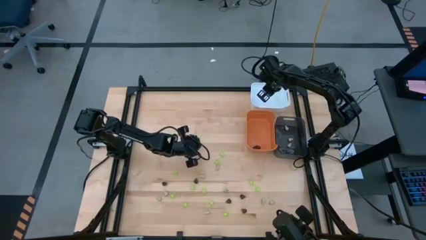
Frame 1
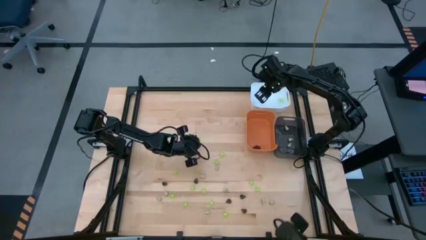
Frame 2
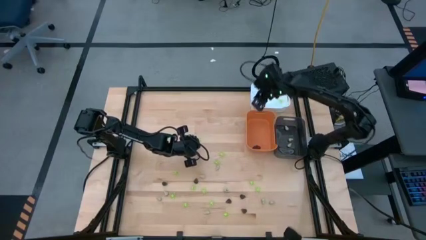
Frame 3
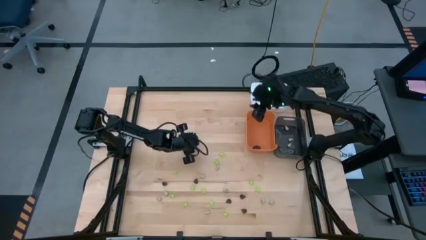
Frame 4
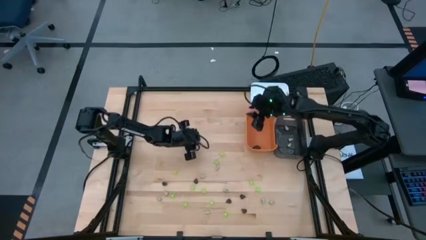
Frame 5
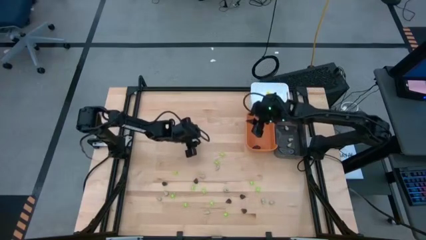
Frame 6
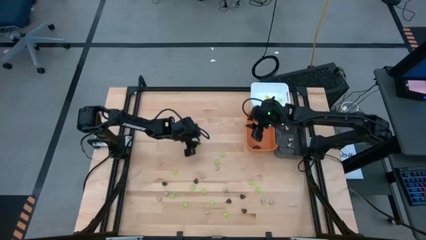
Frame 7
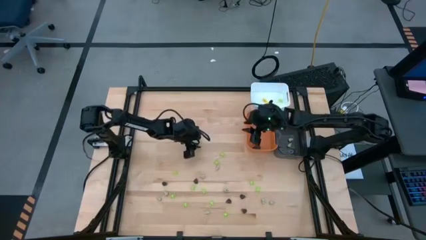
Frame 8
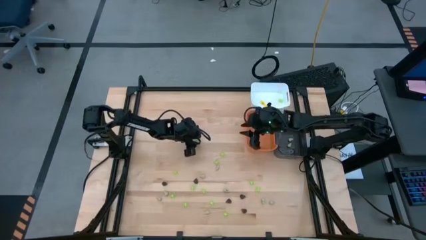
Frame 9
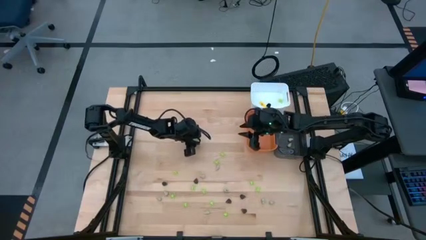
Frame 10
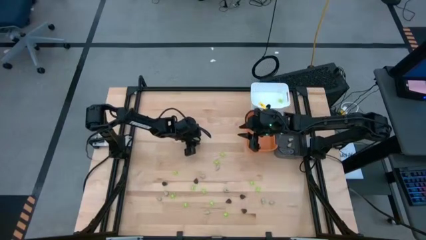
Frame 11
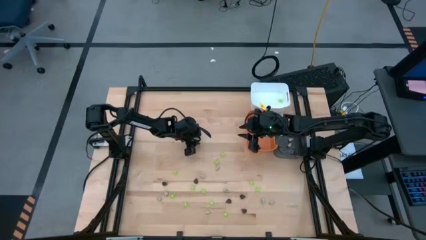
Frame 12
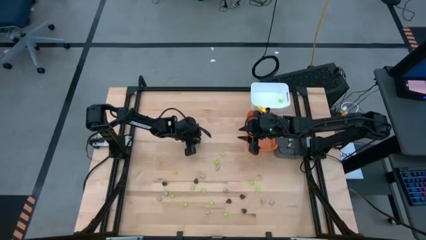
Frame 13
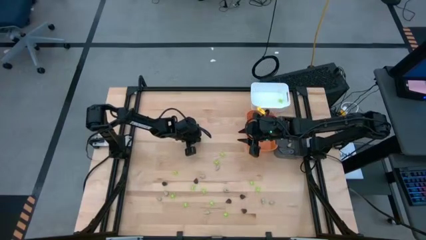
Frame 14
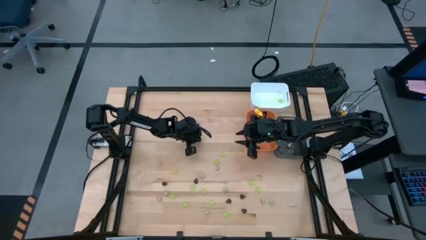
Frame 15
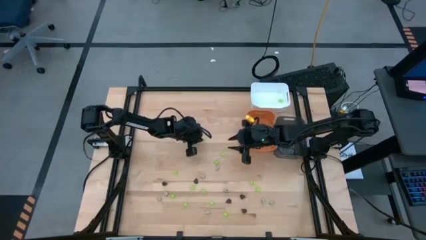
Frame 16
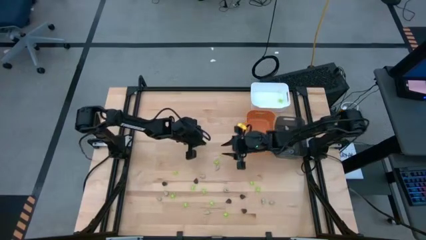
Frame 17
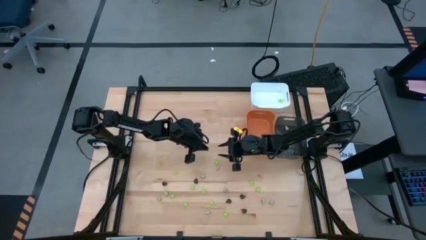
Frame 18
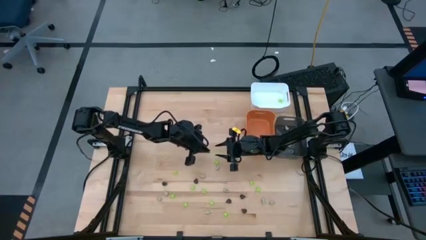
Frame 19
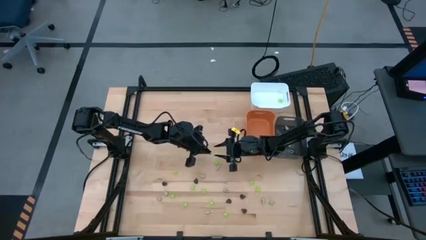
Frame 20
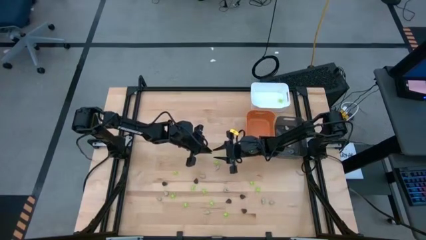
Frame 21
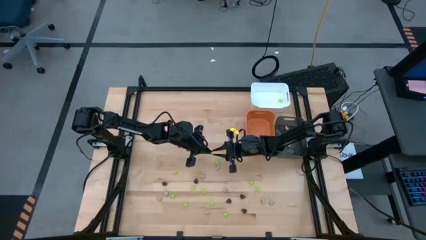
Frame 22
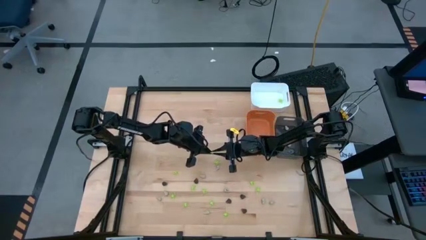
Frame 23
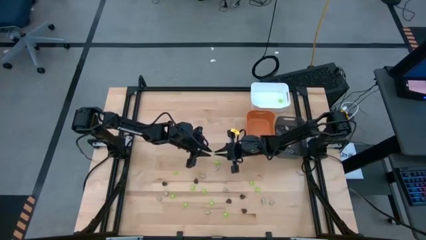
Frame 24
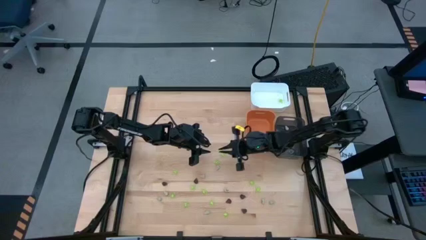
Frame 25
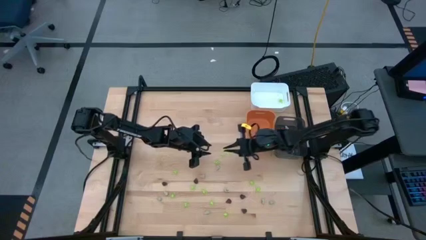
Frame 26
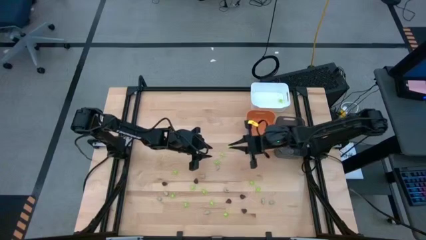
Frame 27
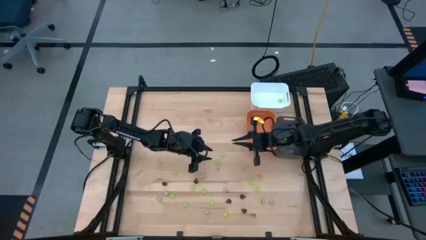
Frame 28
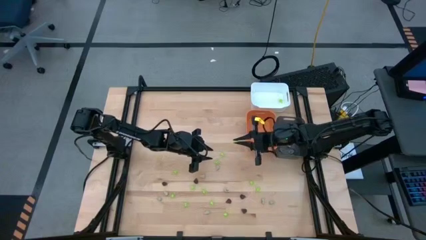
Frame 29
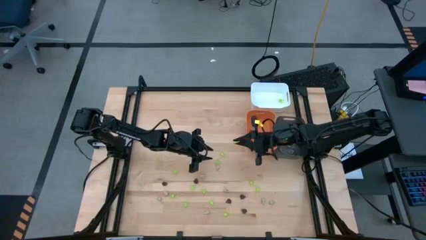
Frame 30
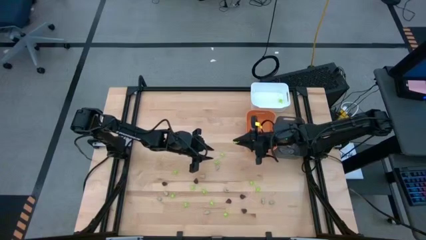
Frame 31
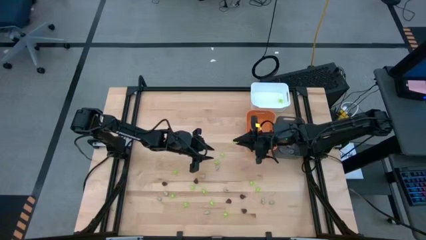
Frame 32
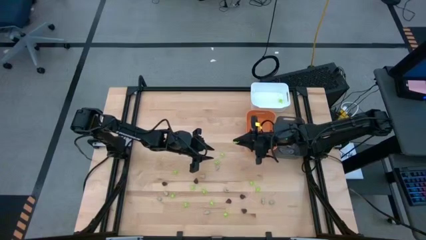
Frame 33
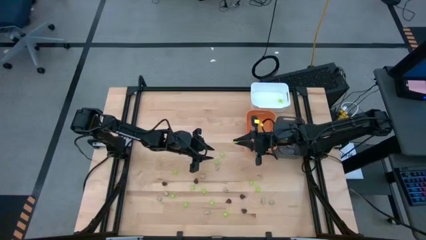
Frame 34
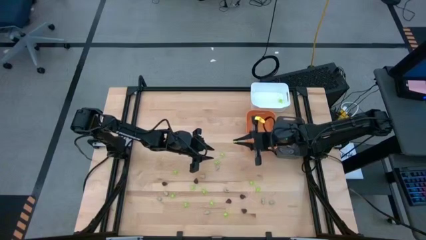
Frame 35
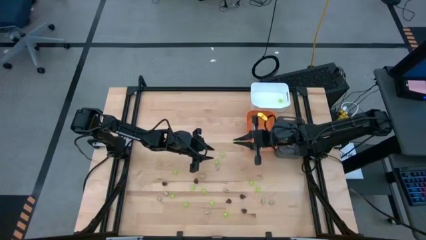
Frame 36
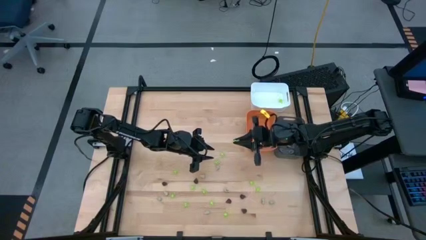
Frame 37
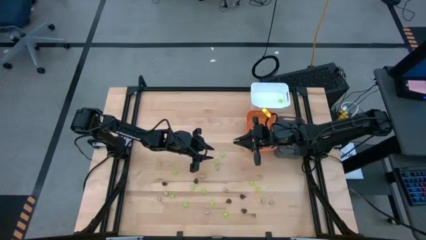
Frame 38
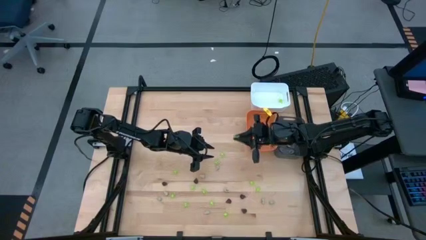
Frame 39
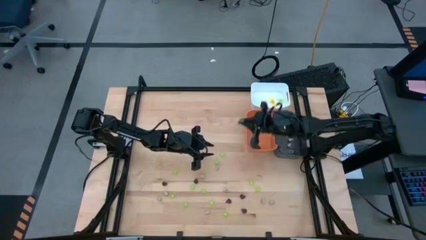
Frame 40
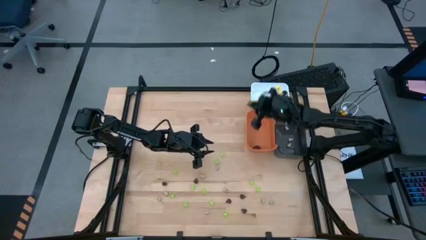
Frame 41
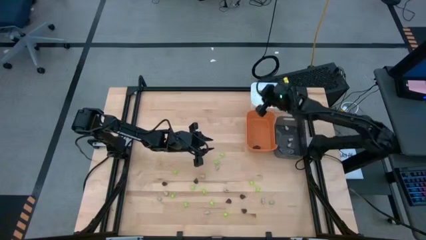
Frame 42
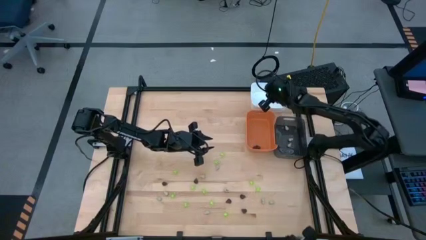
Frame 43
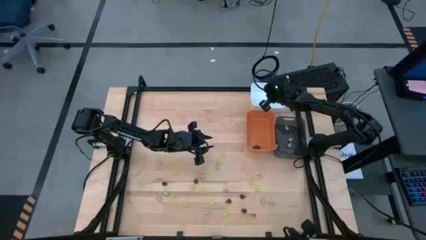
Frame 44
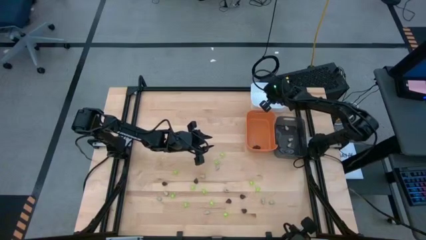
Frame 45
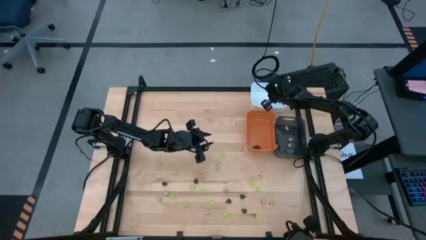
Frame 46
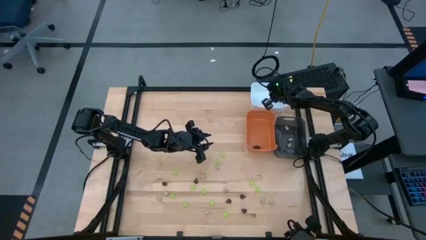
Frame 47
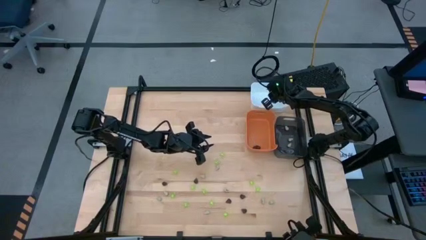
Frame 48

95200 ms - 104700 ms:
Task: Sort Halloween decoration
Put the green spider toy into the white bin

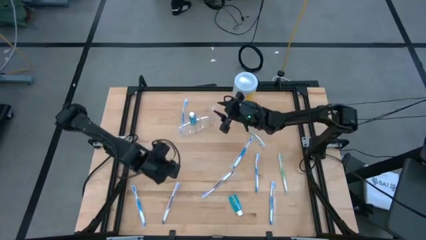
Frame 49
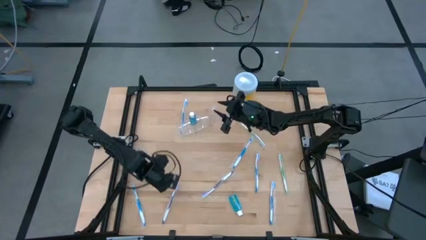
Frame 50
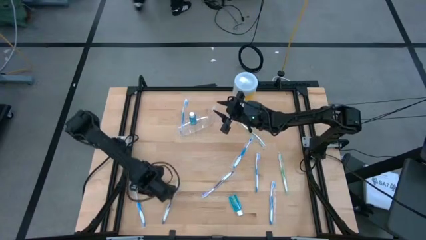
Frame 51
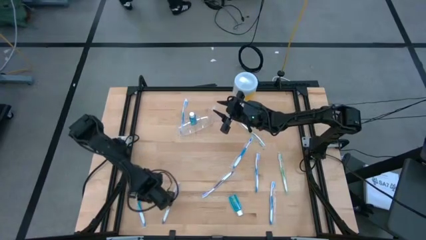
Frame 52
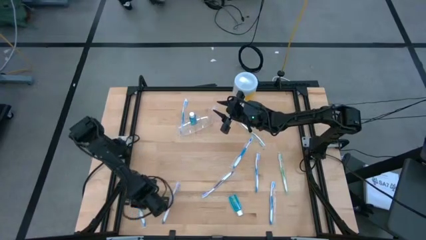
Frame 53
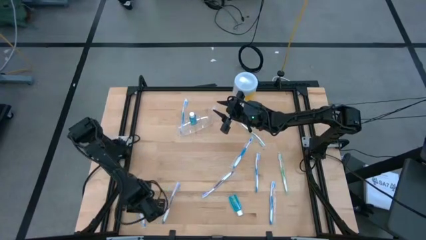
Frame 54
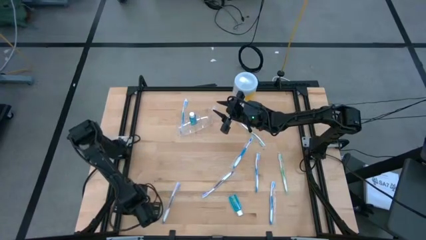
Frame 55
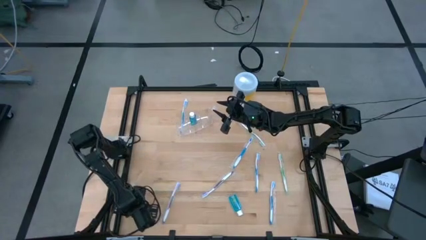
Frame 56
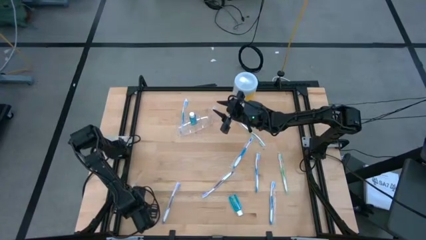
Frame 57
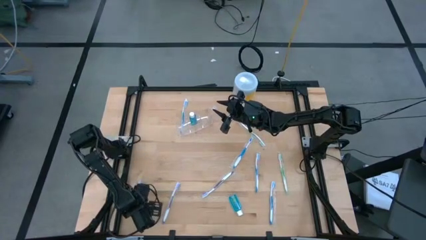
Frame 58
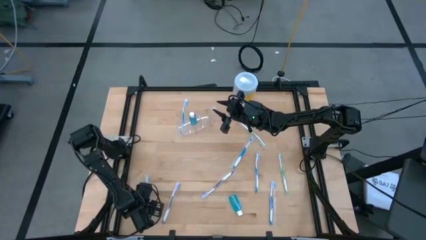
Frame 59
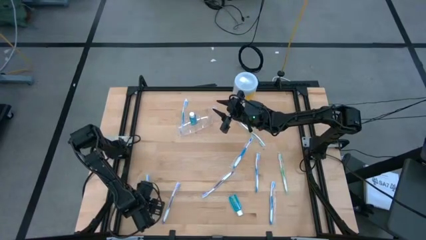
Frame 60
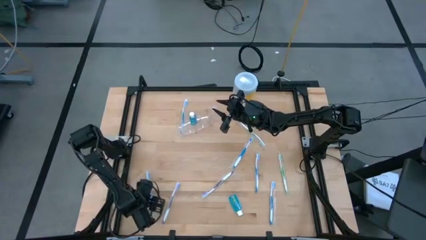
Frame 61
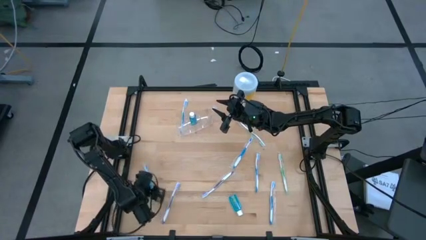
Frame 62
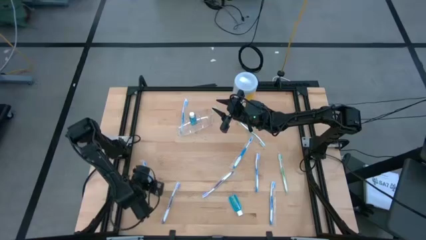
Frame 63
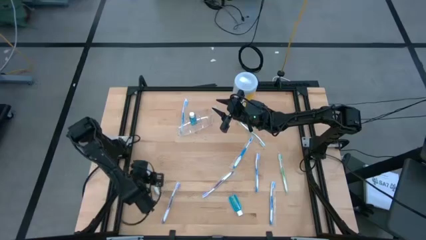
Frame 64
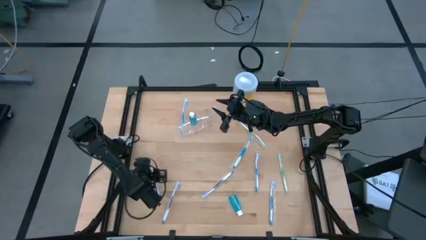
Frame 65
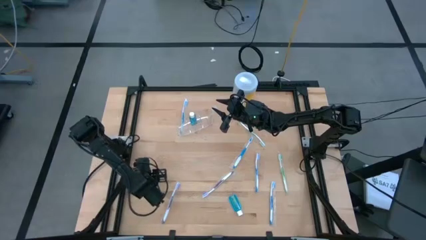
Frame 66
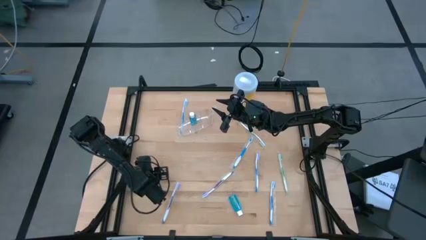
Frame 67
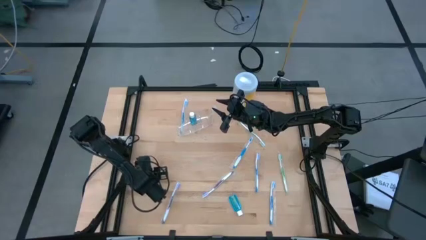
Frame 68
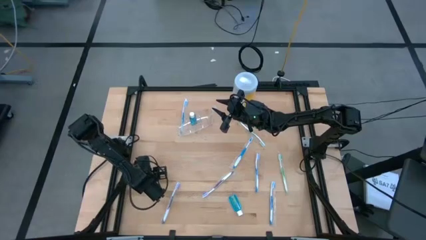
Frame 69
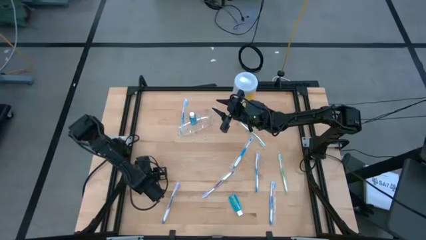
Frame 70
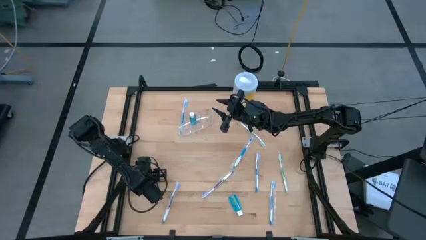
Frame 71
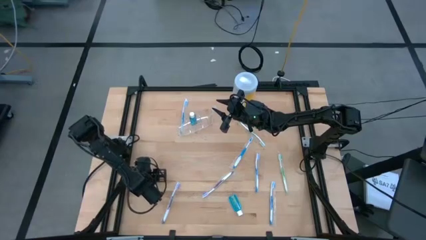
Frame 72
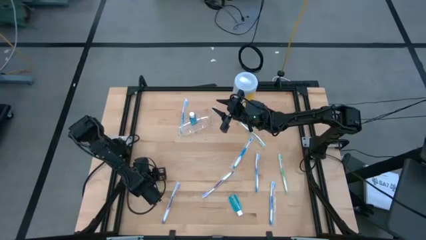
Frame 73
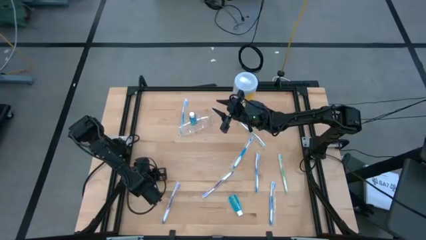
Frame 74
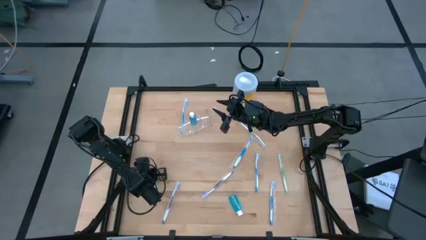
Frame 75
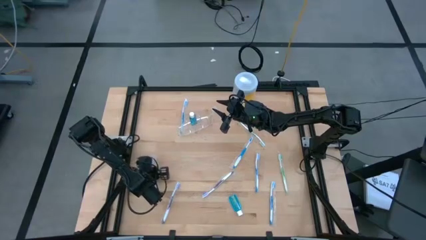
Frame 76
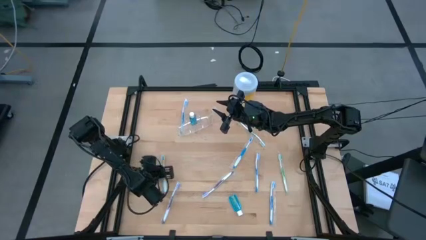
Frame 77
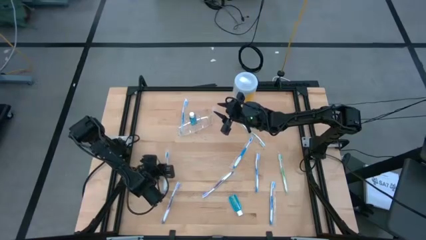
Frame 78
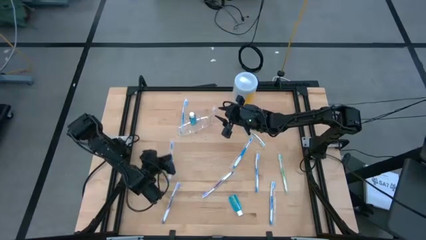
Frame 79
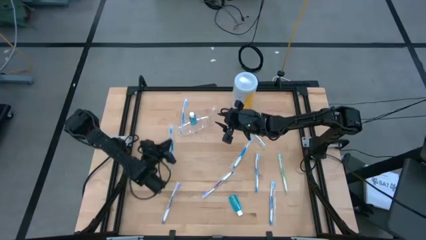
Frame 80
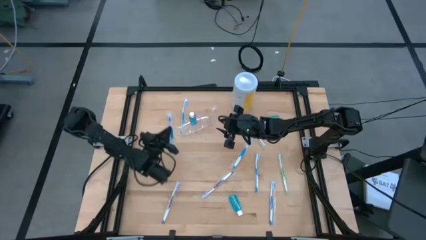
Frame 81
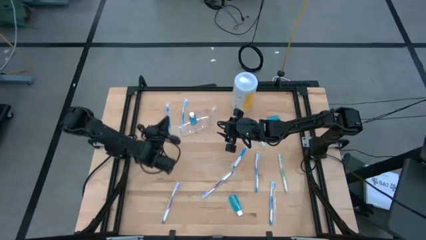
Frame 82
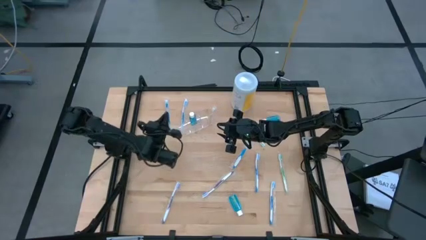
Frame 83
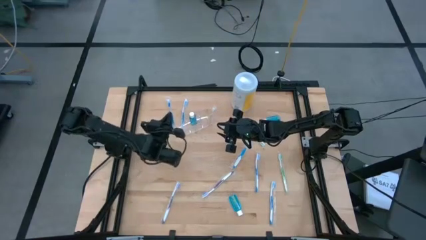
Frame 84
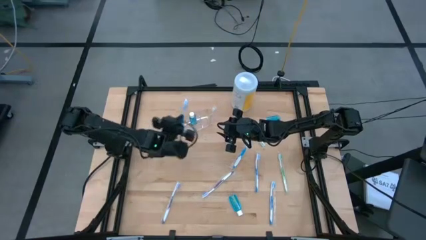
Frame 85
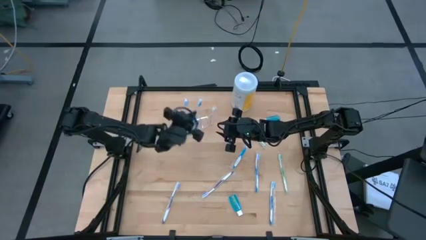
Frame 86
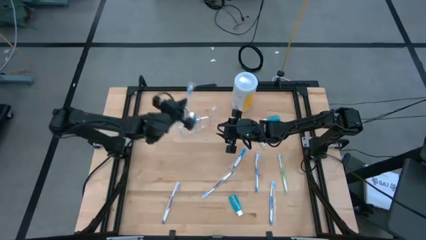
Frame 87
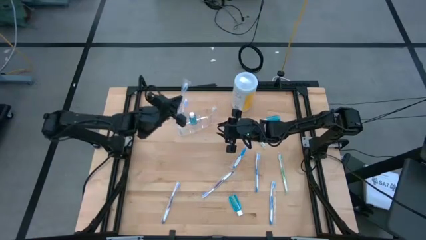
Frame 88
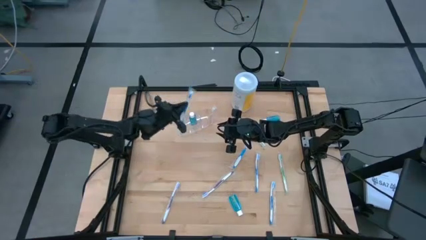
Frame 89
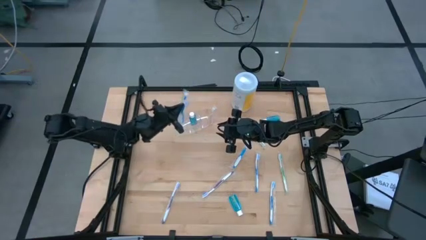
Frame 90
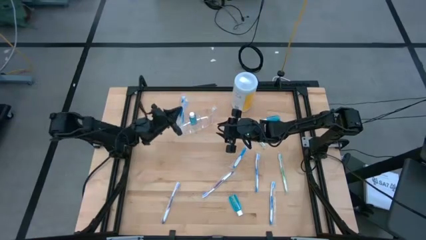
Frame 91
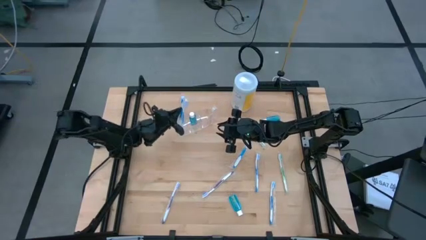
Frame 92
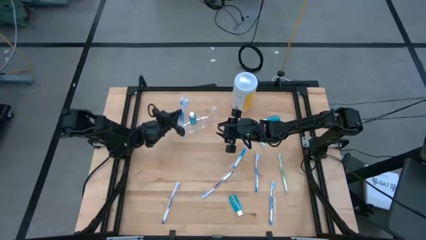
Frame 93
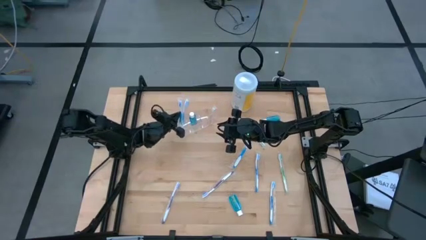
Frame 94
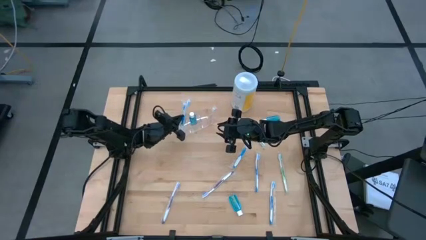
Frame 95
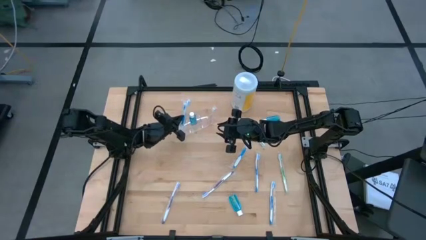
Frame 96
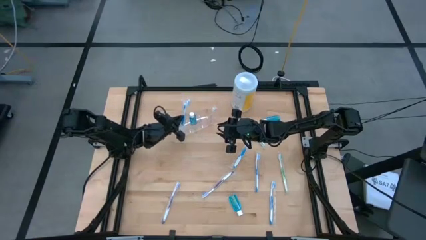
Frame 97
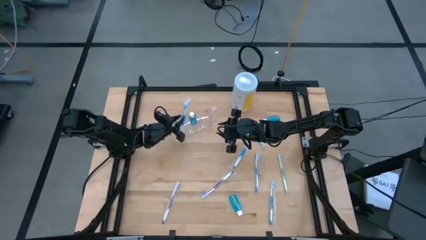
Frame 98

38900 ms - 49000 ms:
Task: Pick & Place toothbrushing station
Put the blue toothbrush into the transparent organizer
